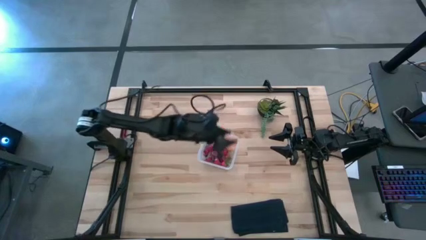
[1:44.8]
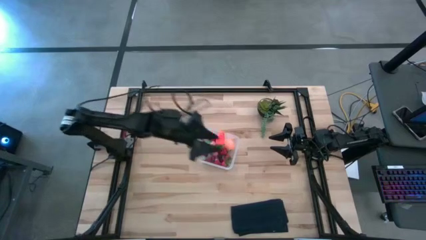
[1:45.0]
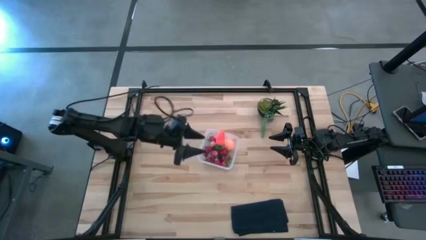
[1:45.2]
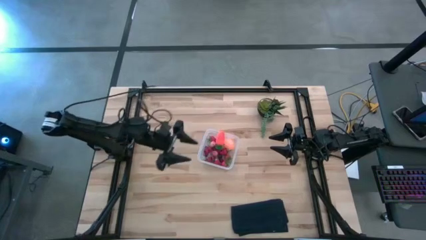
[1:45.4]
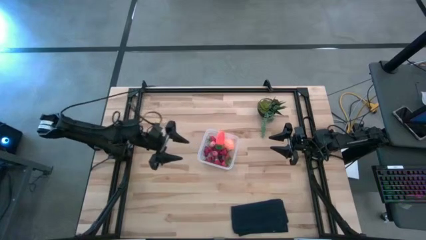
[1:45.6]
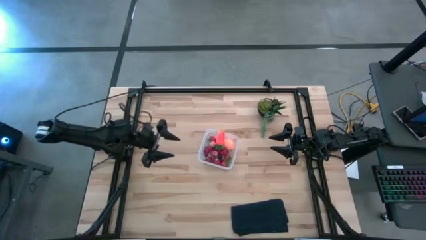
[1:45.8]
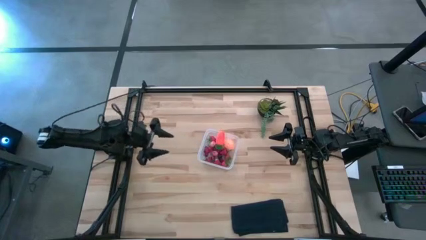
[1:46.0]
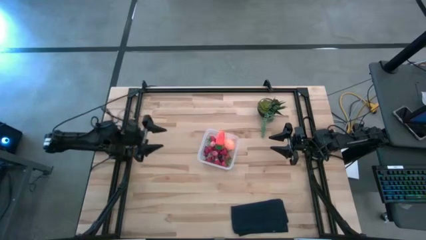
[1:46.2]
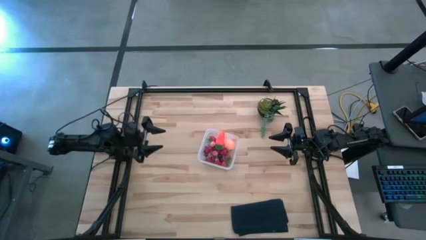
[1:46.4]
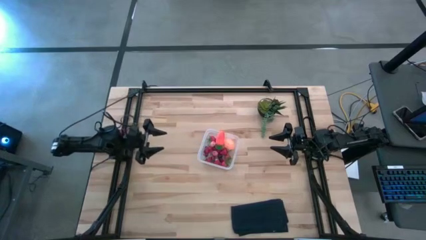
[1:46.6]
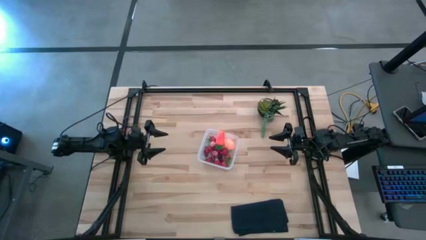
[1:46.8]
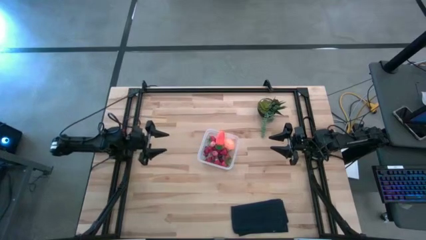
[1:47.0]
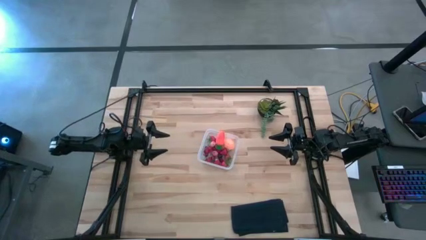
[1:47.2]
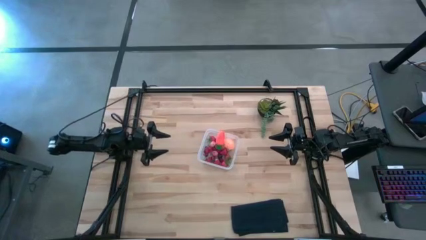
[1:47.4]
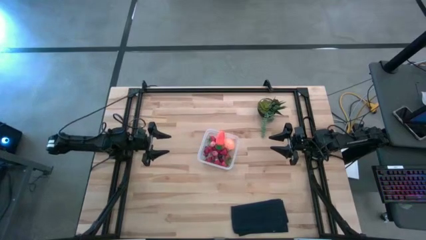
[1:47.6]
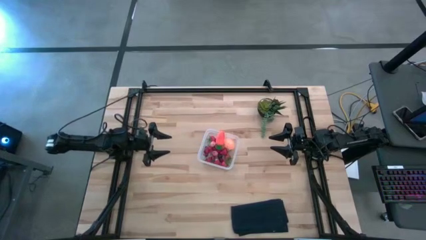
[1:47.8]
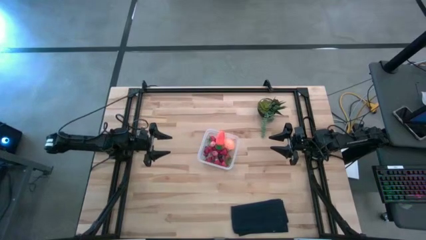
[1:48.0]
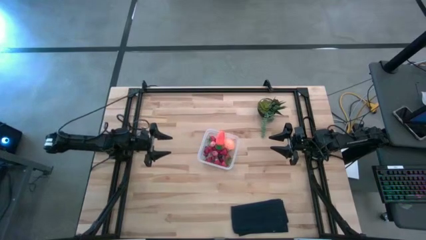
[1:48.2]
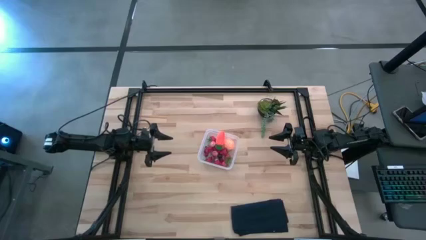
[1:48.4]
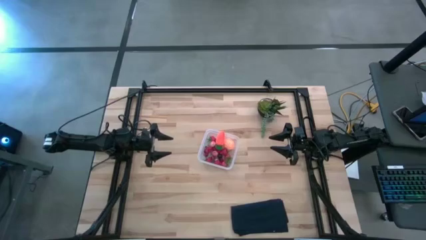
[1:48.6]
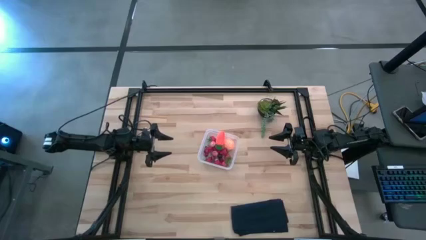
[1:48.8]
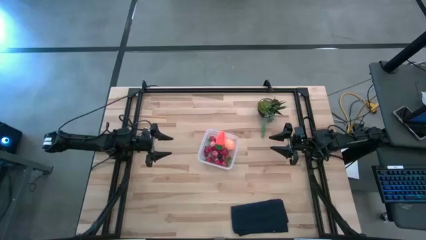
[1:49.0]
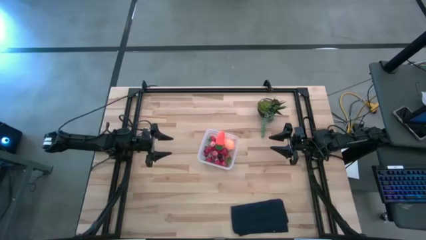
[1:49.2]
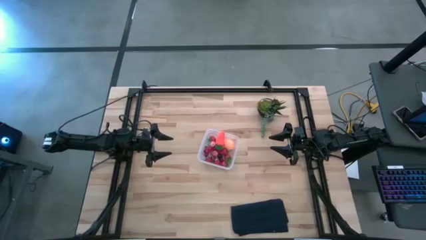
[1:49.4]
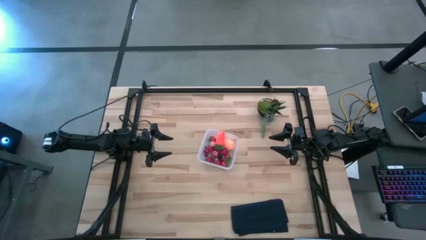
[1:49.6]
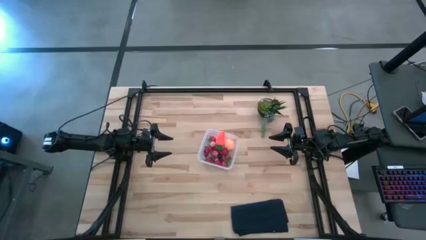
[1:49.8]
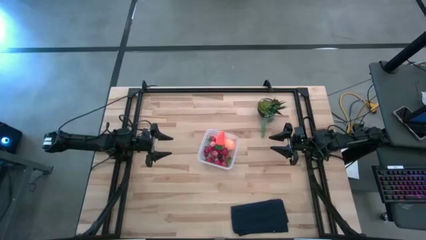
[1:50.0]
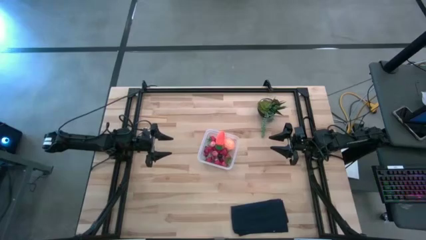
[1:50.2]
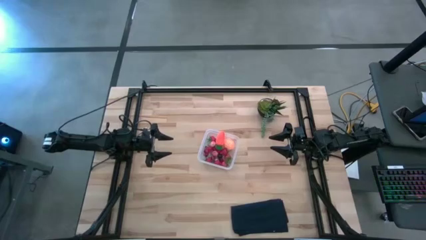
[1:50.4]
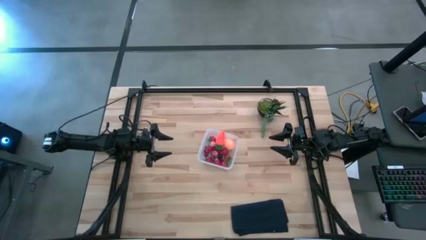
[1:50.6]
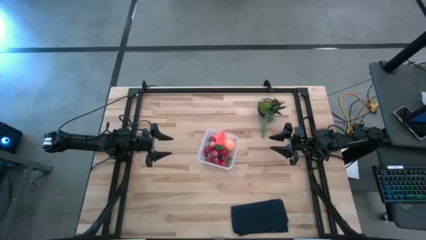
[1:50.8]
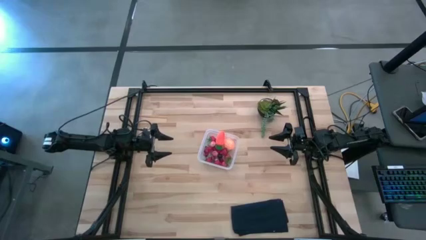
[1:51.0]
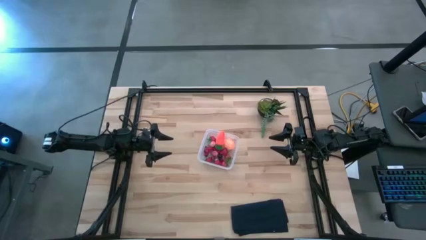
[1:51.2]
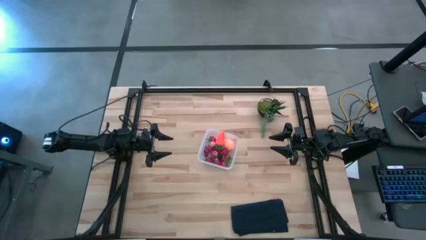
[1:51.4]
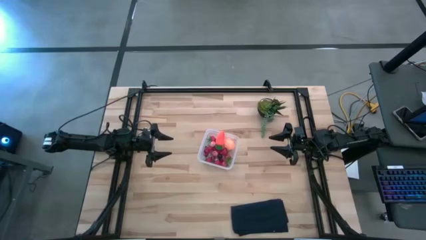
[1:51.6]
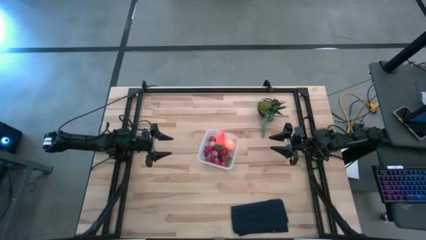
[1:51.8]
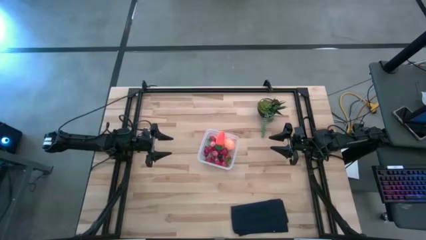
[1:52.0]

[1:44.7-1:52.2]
Task: Pick and placing Produce into tupperware
Return to Home Position

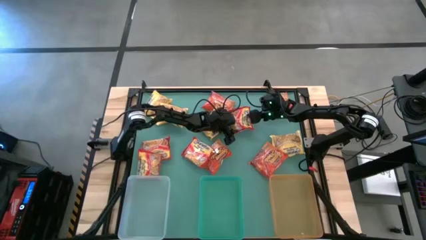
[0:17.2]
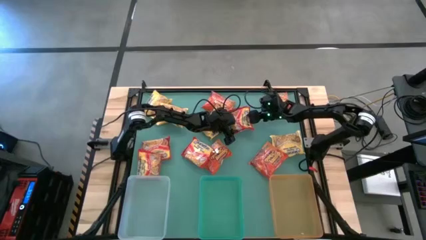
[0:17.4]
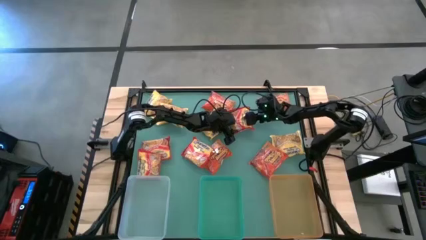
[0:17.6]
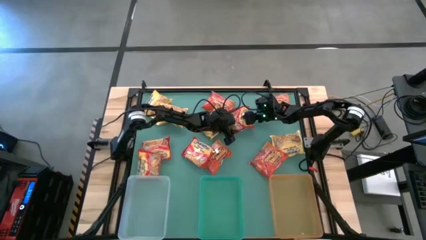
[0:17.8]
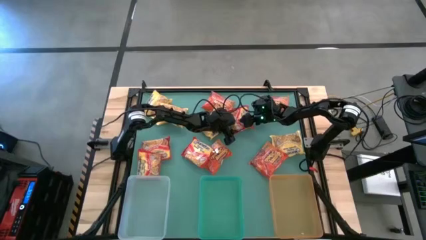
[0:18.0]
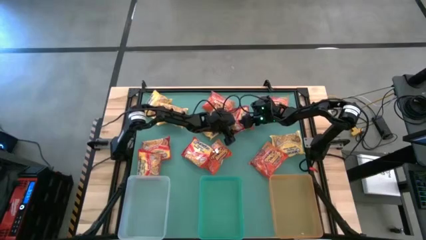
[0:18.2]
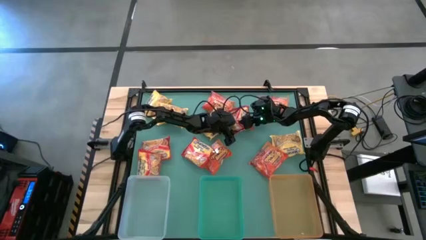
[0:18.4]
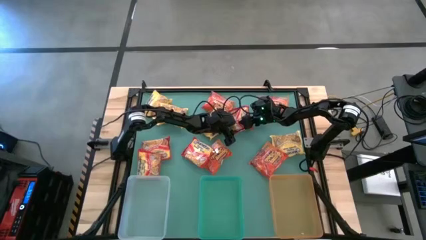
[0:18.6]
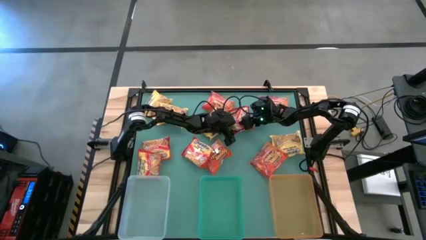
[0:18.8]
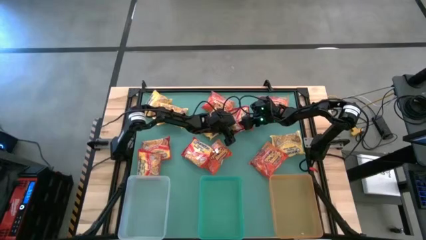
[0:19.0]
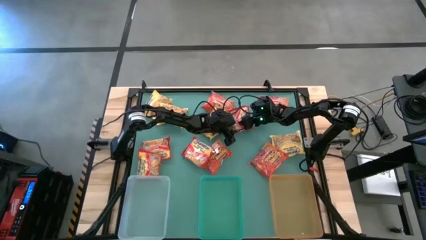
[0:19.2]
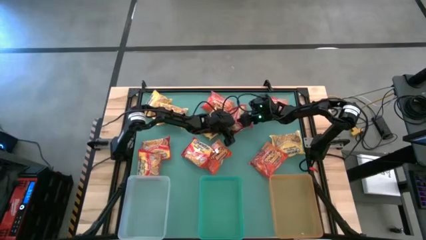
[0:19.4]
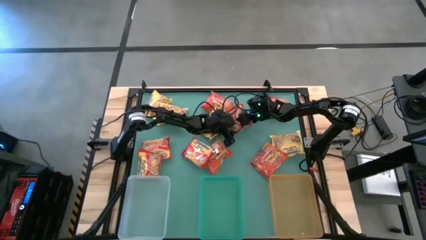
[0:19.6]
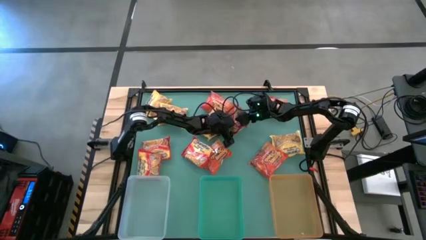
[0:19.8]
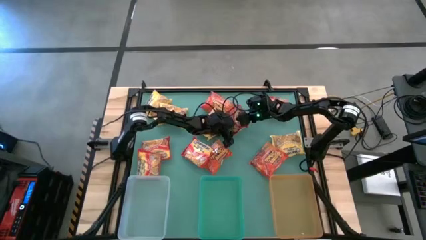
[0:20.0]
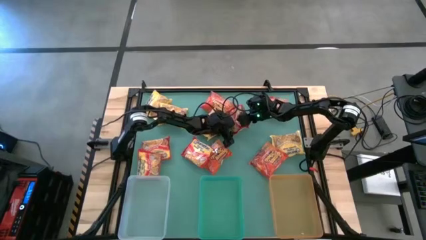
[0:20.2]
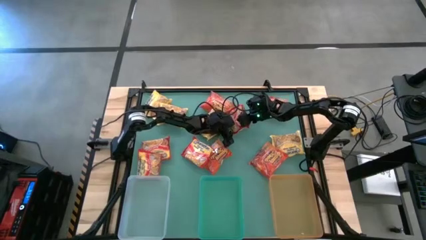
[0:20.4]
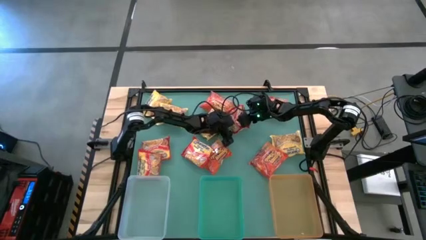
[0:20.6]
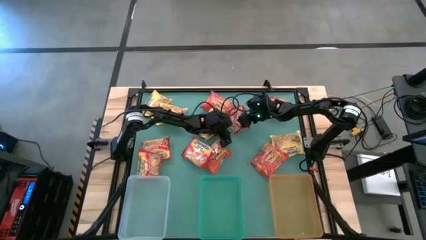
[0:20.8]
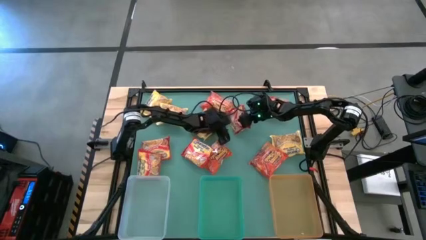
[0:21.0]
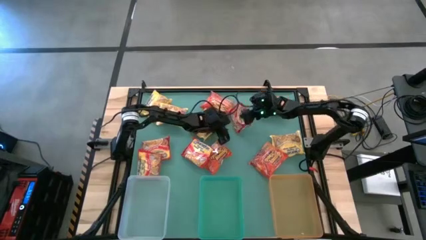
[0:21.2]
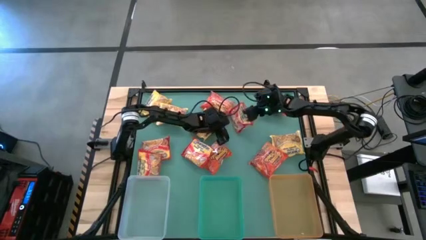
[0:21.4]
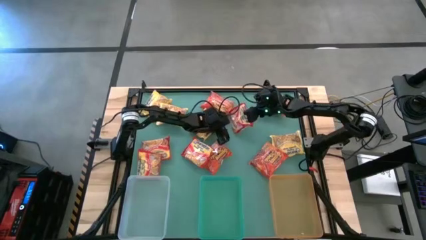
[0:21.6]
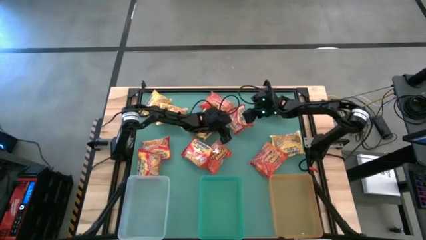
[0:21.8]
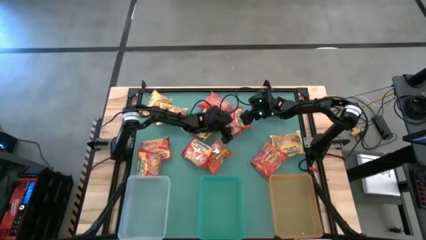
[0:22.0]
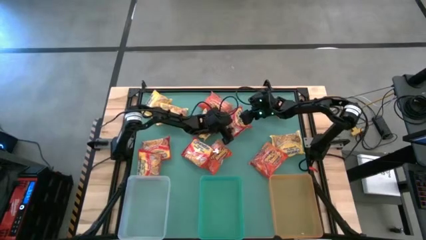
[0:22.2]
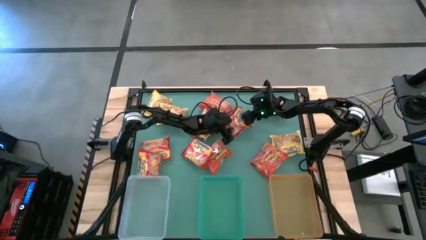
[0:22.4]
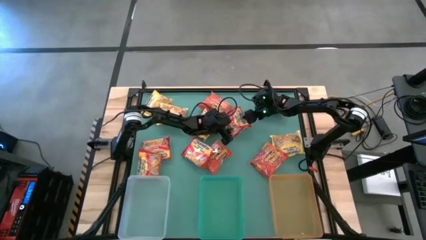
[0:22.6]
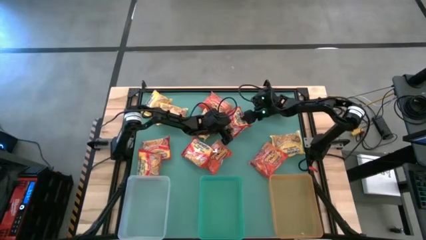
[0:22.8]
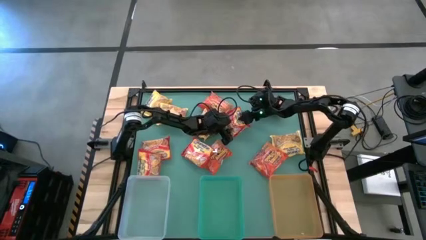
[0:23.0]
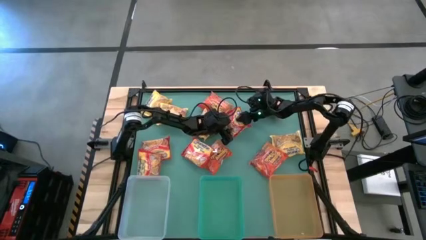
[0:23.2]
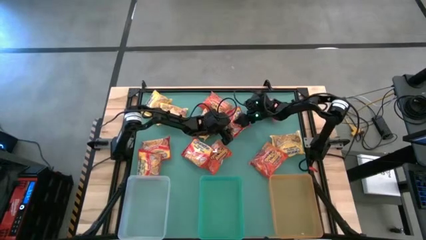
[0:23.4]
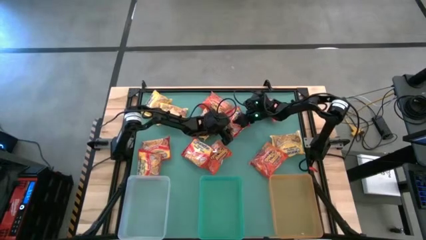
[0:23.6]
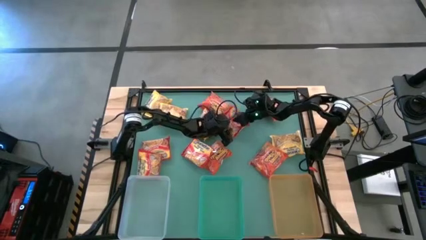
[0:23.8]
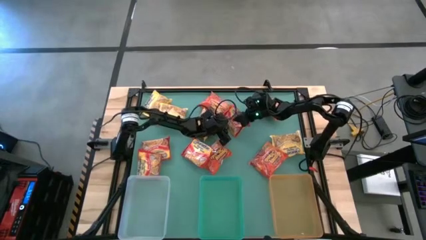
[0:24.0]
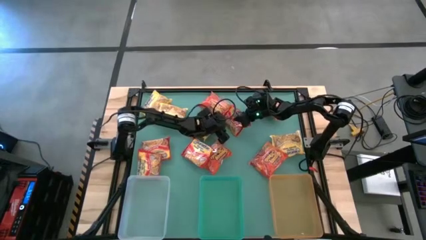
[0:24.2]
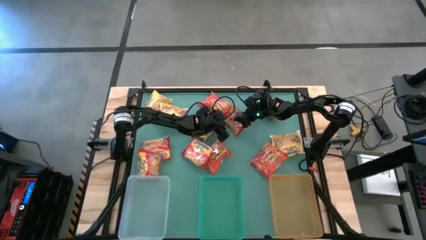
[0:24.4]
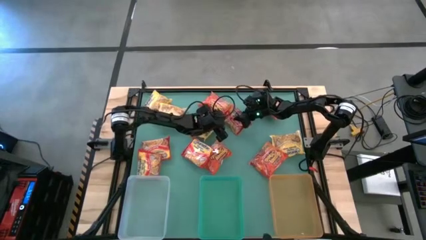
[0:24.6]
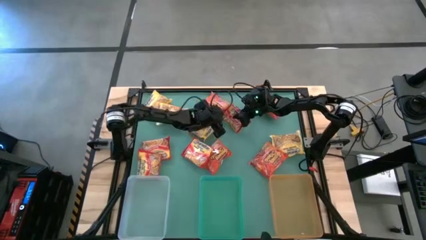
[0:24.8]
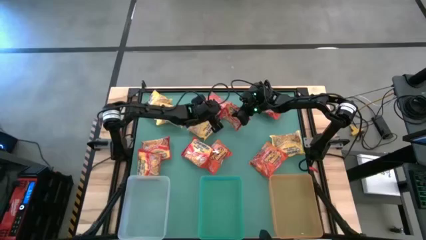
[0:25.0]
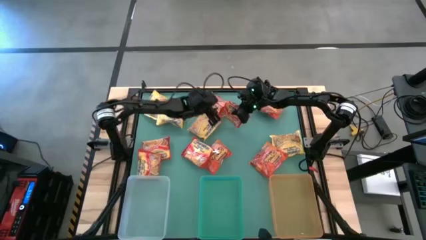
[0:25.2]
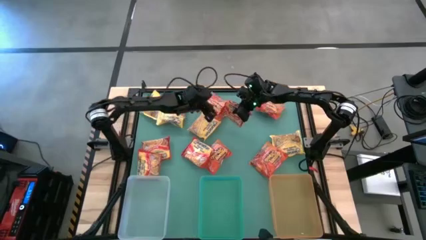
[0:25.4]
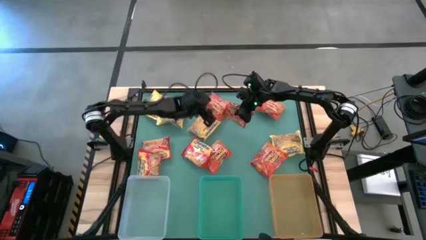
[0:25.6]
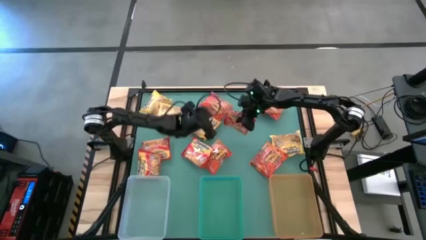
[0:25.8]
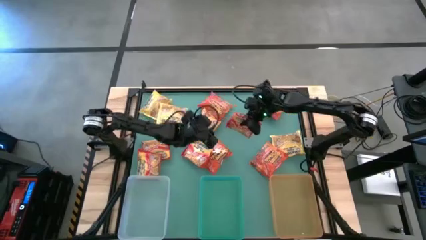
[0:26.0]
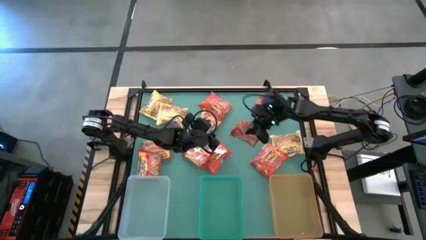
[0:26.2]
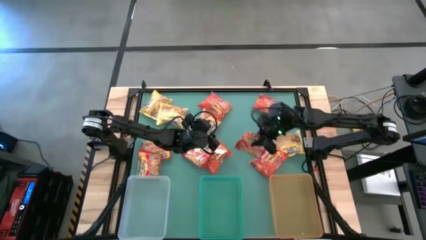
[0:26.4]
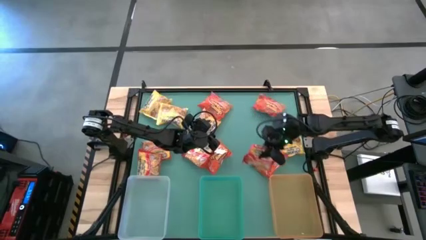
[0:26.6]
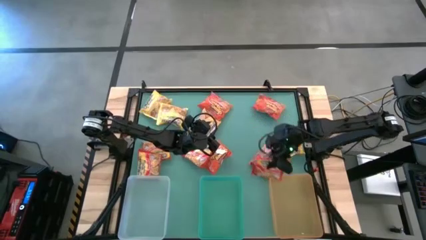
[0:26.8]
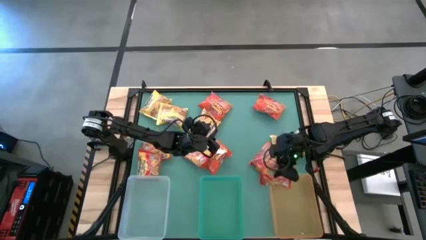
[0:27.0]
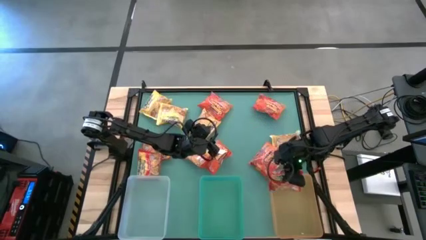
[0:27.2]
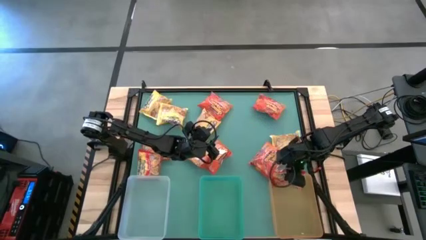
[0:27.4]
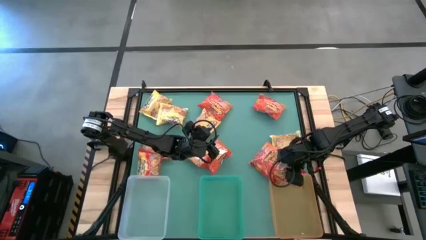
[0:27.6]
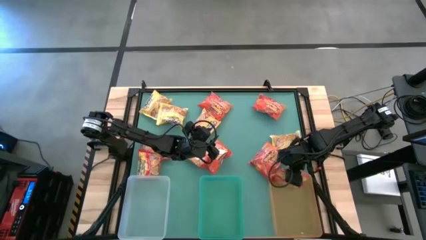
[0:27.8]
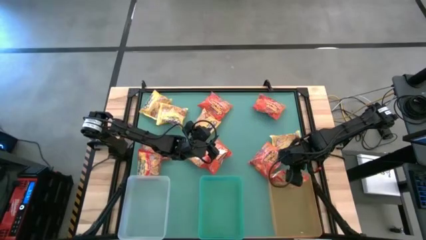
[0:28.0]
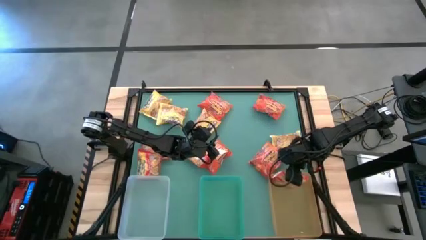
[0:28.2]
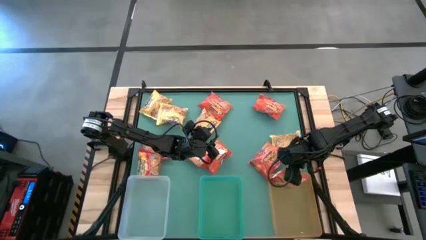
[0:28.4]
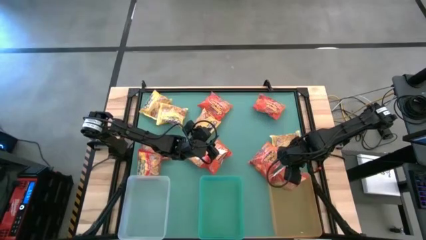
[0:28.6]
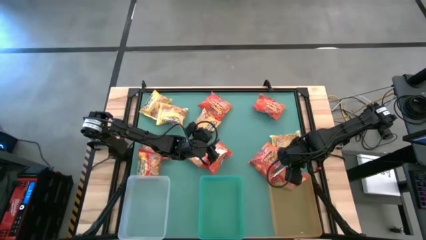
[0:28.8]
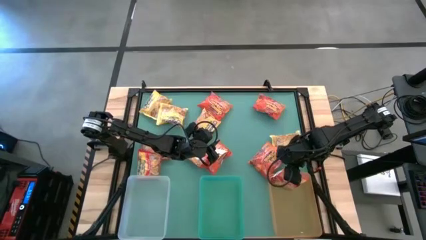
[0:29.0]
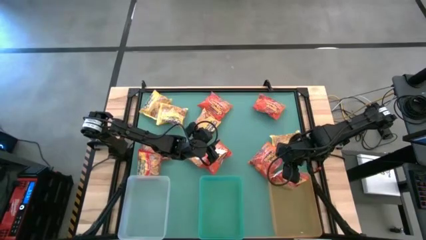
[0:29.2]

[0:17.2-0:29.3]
Task: Sort Maruchan noodles
Put the red noodle pack into the orange bin
